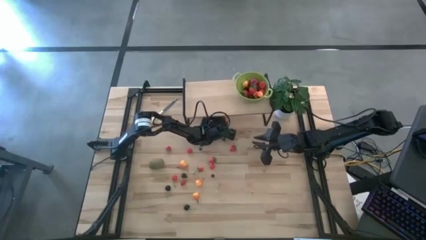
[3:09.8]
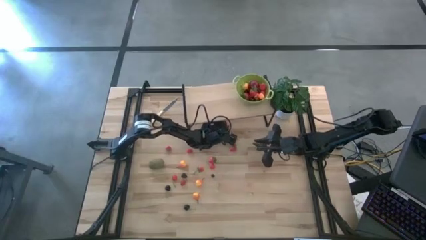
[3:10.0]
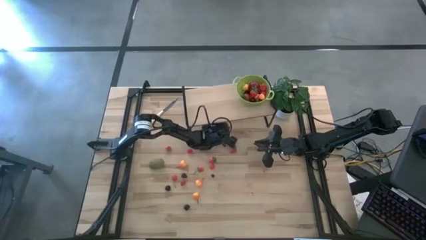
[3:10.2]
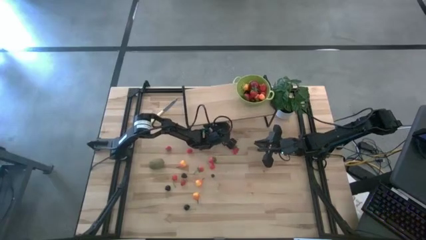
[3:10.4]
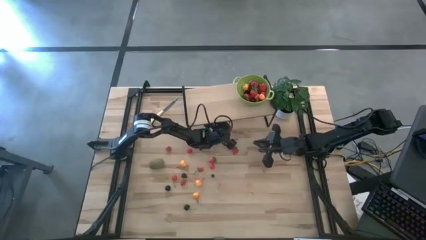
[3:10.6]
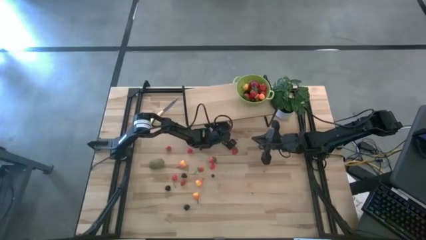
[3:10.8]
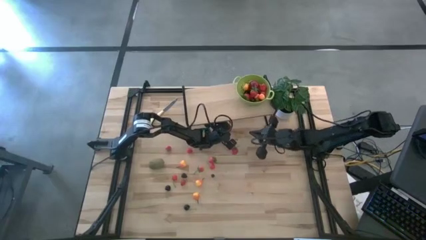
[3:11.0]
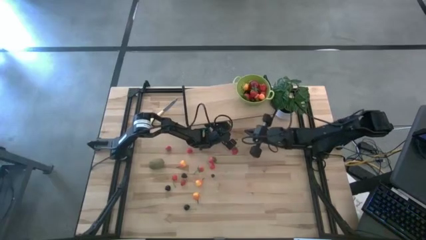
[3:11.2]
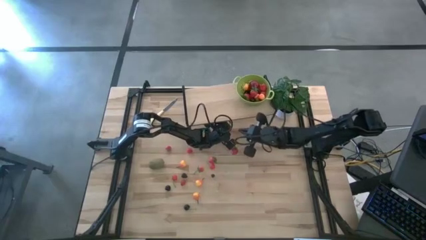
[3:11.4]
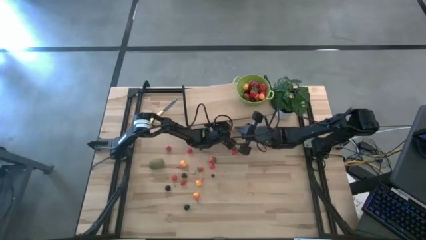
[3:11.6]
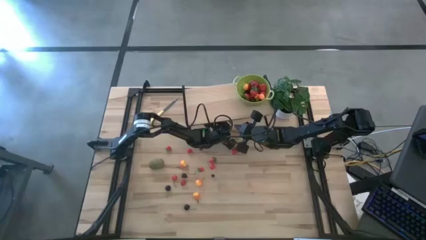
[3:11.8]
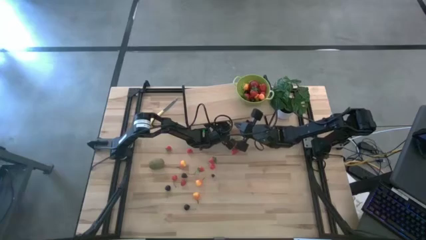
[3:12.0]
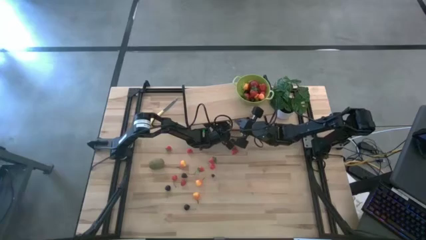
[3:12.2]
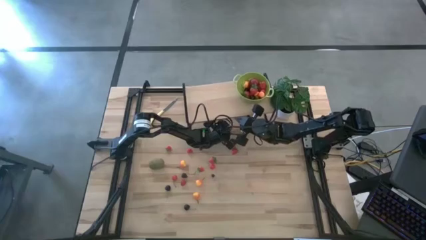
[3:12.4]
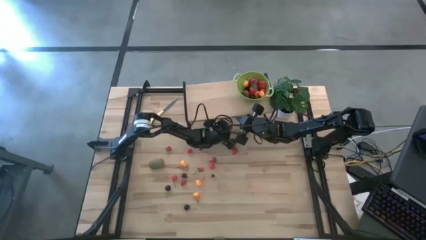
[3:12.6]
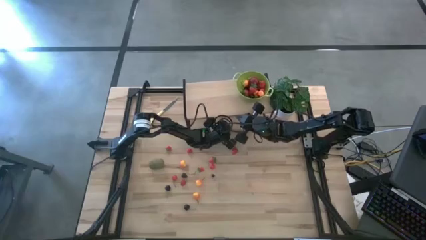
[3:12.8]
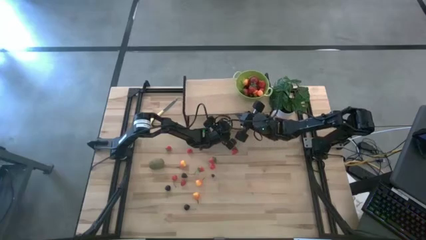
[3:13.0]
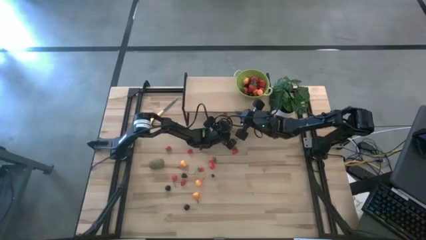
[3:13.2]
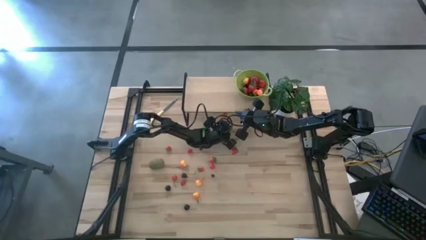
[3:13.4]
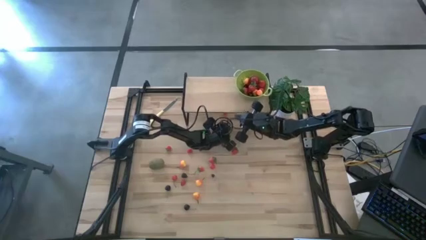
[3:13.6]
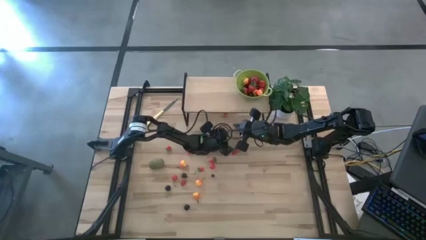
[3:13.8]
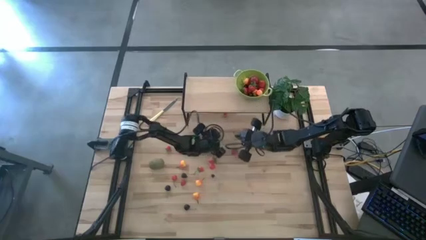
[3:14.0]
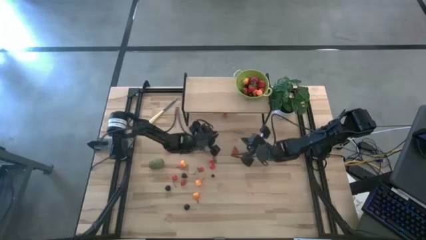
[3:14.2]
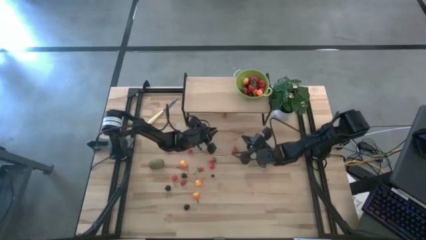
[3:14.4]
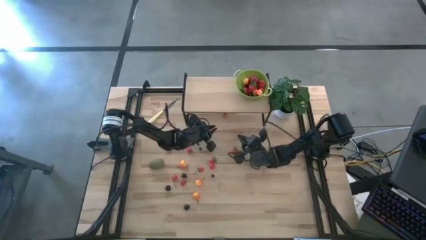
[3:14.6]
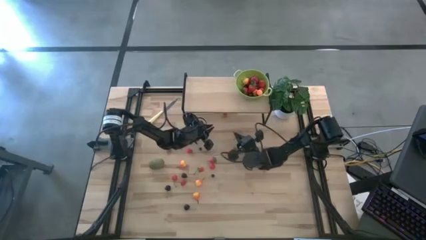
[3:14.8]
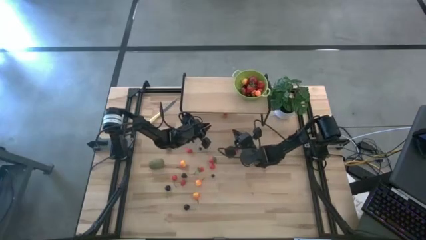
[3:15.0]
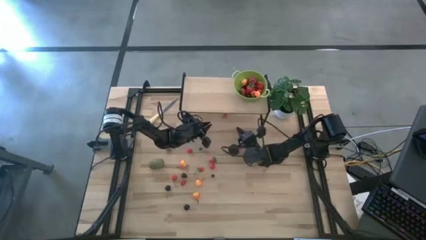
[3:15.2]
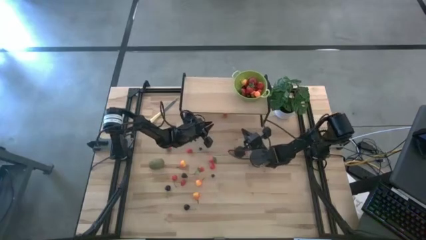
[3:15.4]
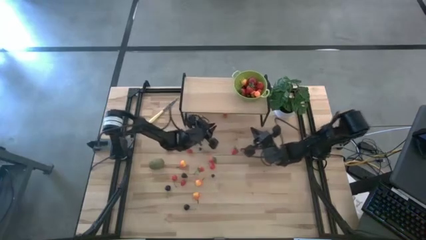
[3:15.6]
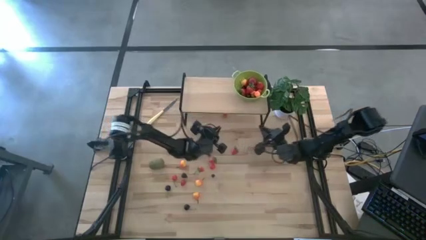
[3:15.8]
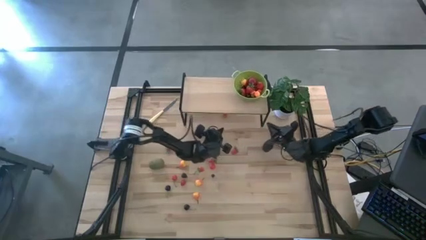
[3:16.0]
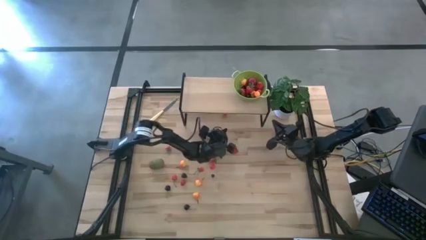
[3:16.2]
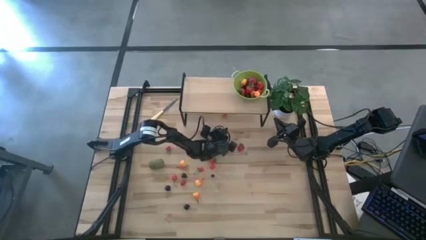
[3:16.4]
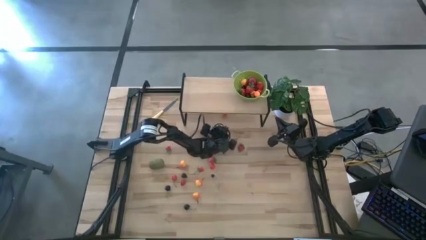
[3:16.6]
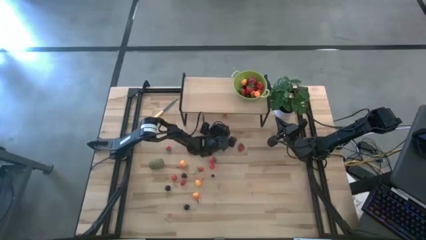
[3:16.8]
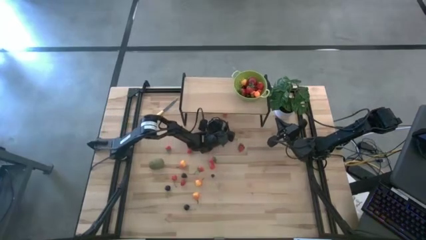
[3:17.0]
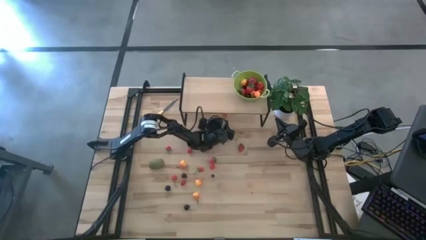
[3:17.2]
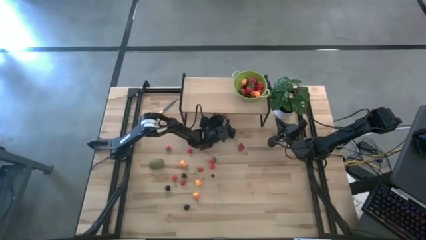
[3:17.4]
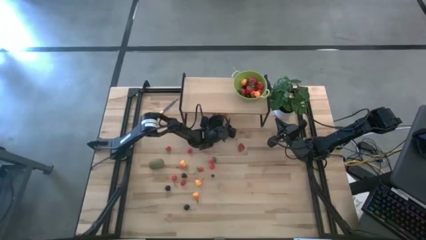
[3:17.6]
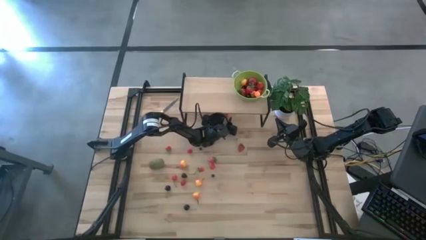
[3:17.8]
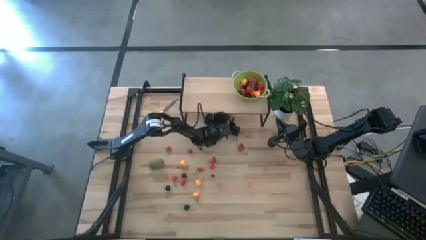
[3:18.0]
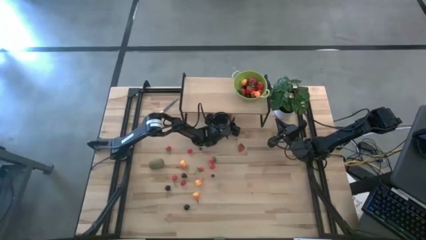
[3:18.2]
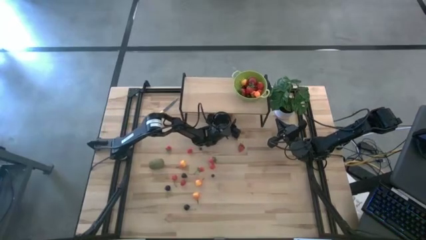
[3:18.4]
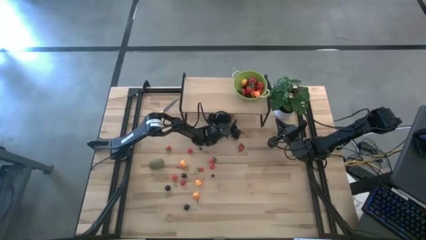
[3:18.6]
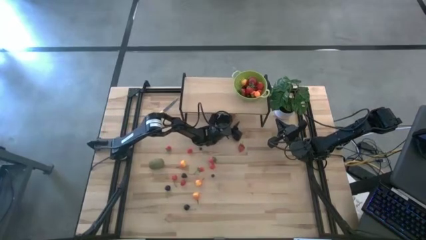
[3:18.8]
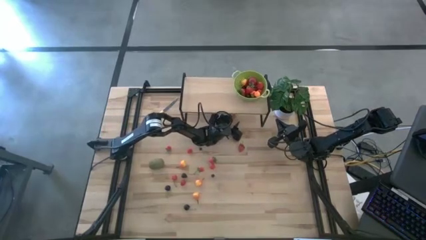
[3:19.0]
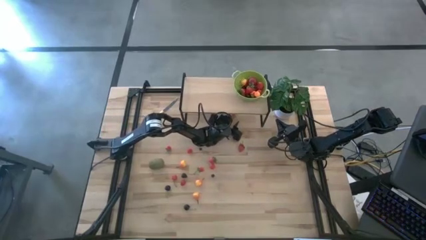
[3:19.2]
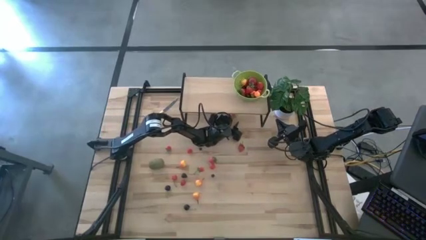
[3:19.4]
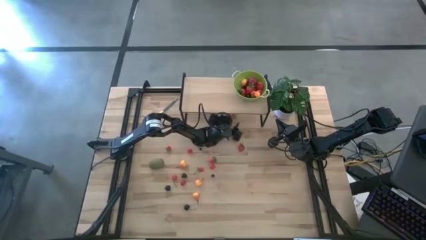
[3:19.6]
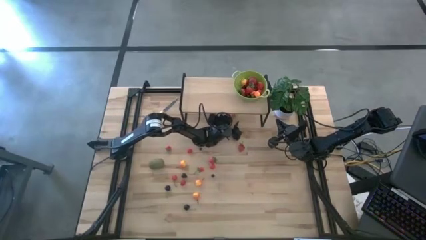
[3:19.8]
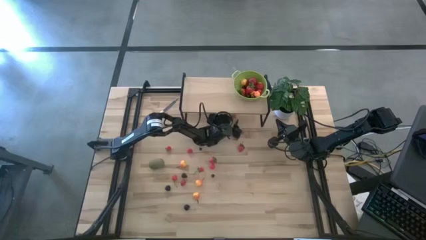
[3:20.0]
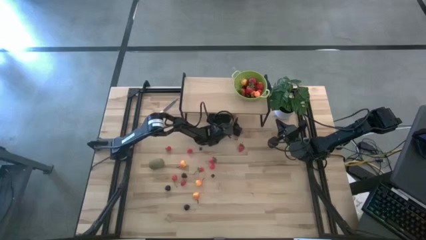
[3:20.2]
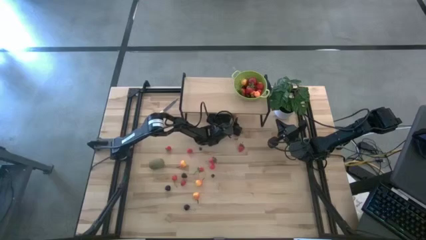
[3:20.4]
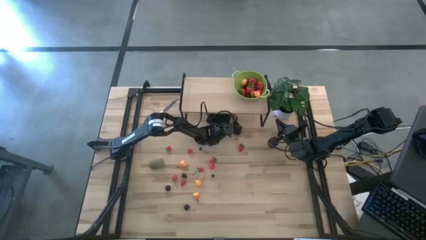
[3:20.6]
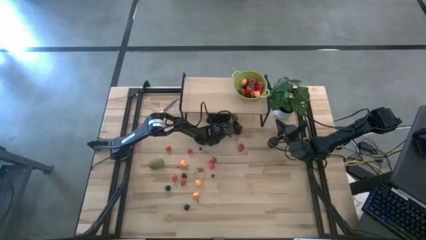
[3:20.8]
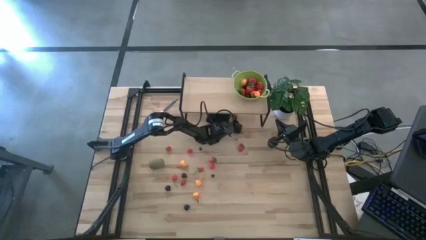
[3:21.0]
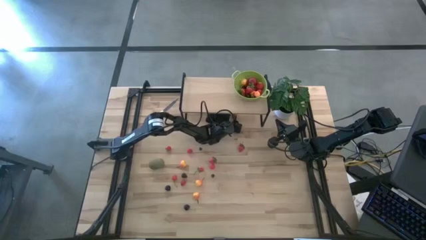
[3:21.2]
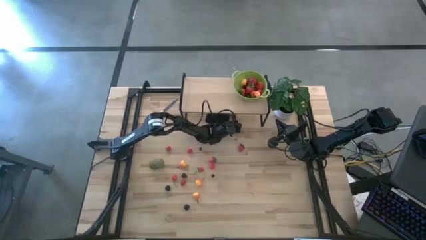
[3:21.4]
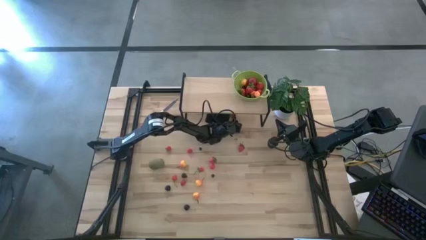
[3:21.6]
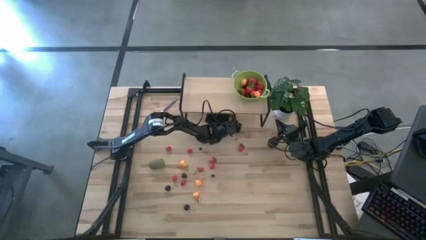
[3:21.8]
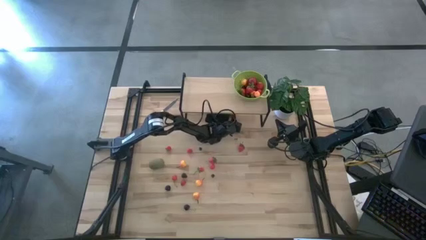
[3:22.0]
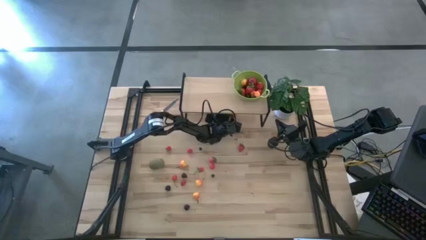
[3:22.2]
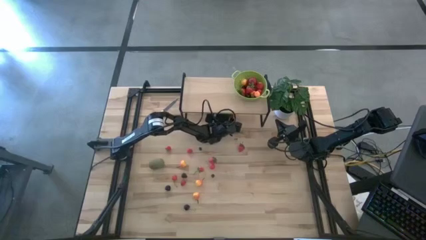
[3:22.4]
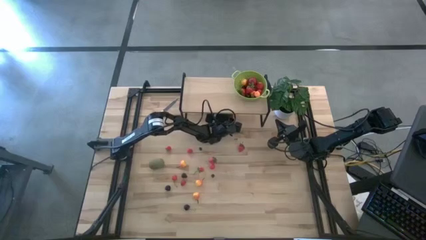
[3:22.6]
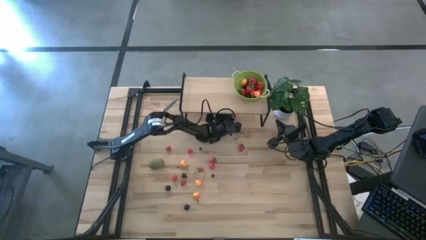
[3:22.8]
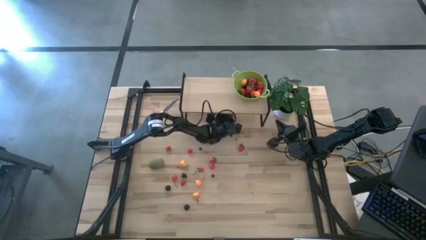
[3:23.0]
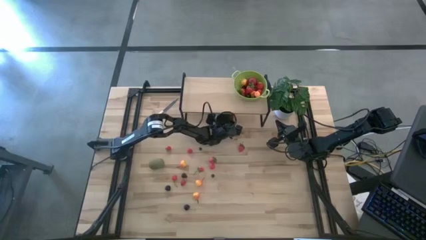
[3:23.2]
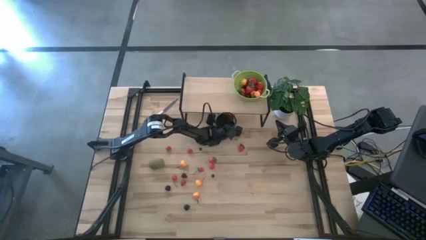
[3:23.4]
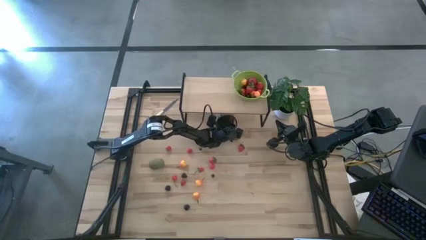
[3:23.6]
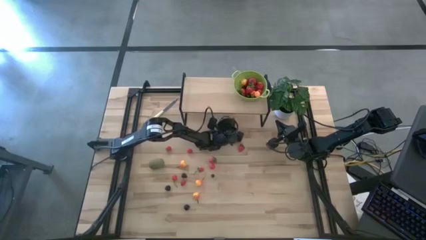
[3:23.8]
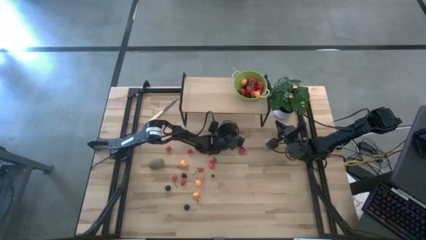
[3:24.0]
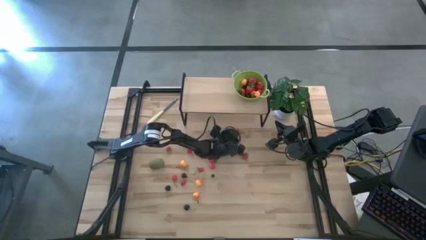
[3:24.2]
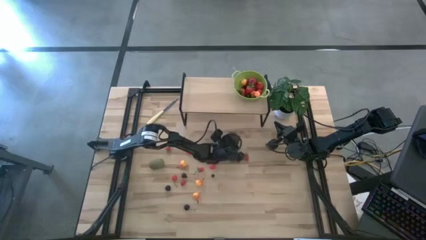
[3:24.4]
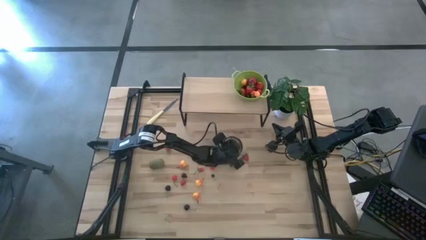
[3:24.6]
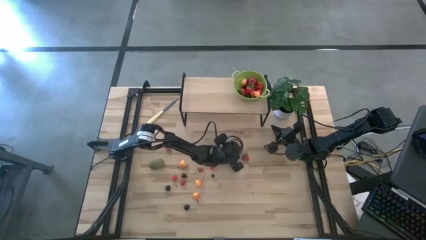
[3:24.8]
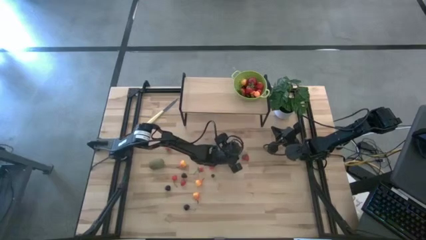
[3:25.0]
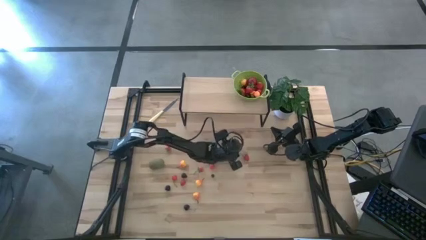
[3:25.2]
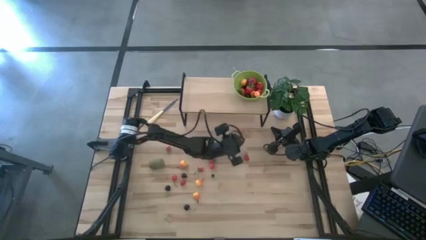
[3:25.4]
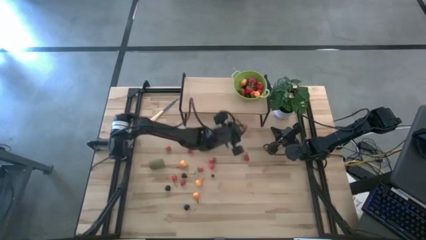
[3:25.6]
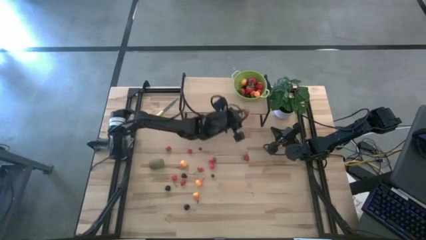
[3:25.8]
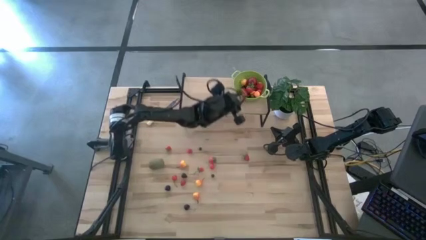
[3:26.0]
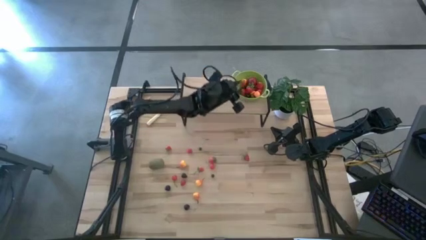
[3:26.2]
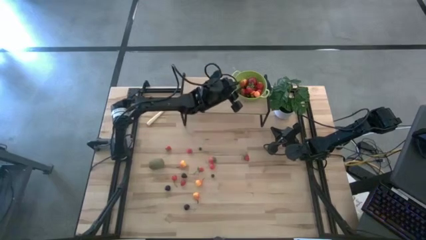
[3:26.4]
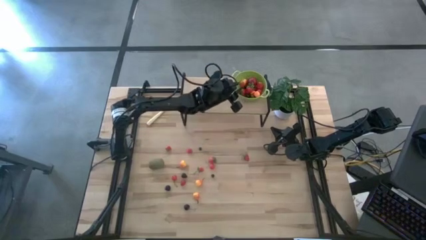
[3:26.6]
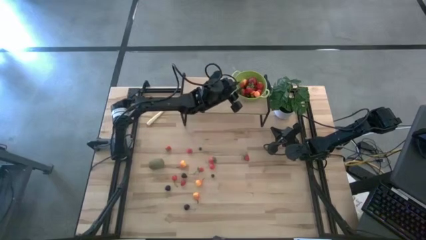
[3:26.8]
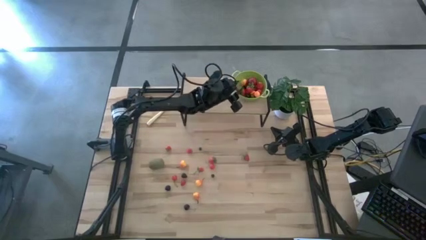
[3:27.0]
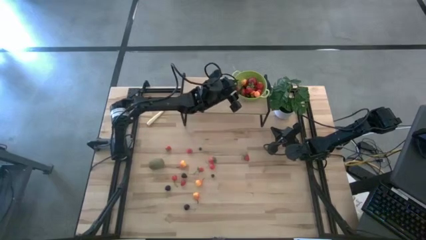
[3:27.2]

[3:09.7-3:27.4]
Task: Build produce basket
Put the strawberry into the green basket
